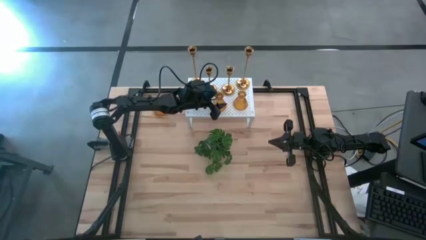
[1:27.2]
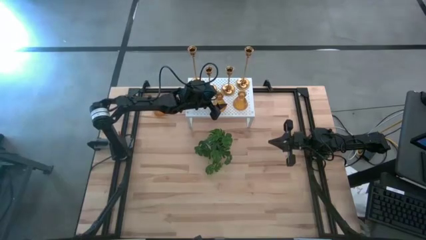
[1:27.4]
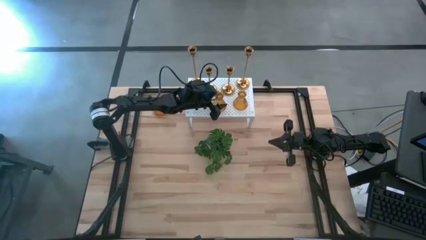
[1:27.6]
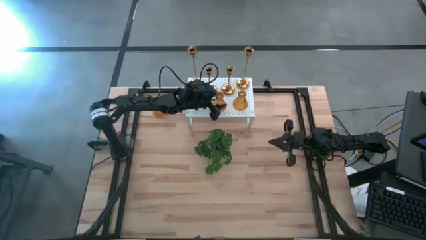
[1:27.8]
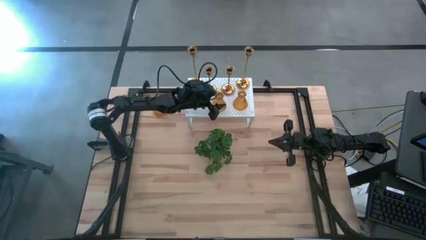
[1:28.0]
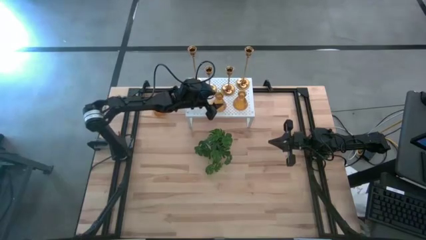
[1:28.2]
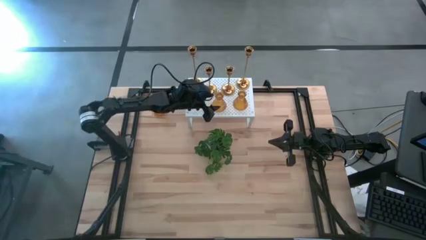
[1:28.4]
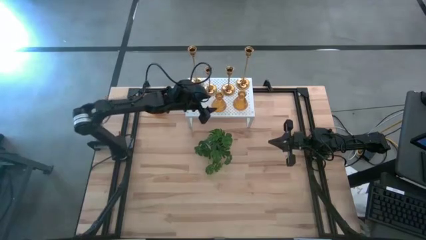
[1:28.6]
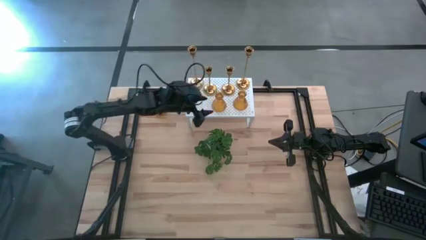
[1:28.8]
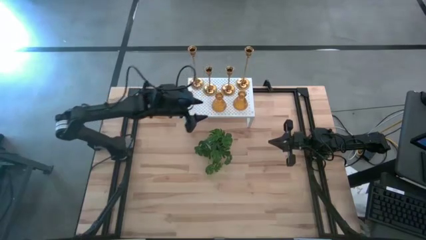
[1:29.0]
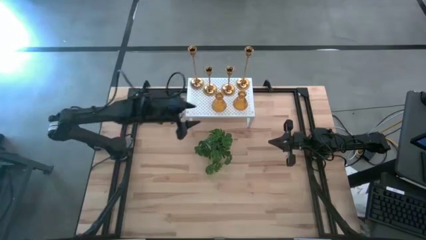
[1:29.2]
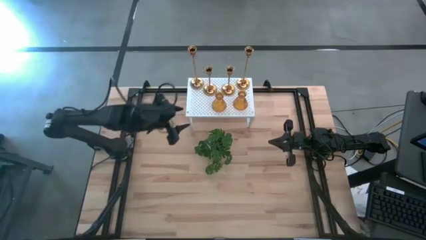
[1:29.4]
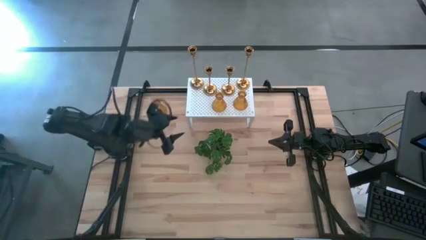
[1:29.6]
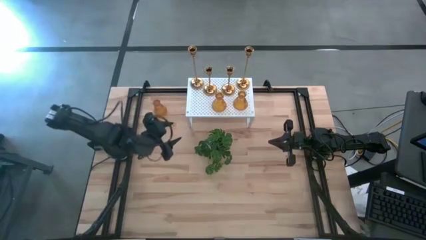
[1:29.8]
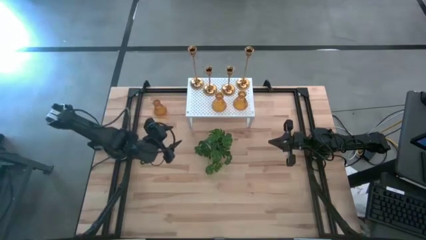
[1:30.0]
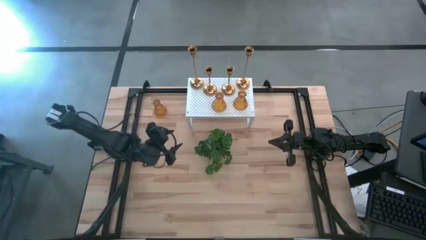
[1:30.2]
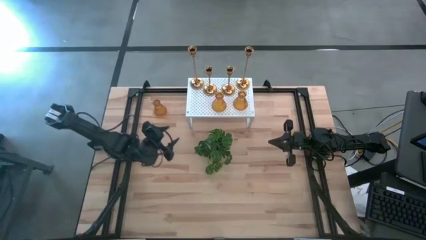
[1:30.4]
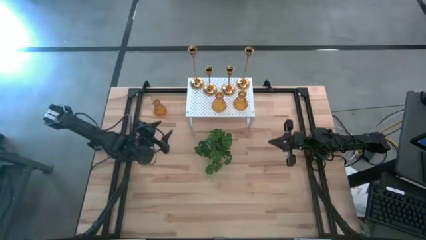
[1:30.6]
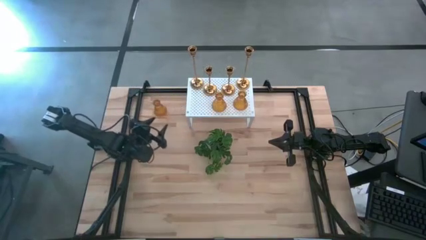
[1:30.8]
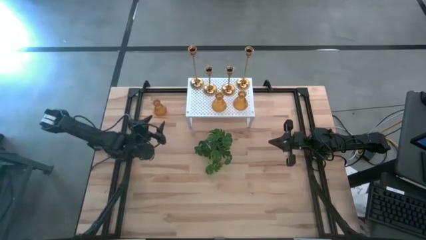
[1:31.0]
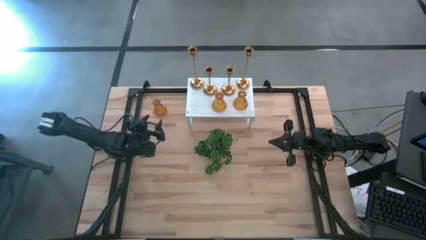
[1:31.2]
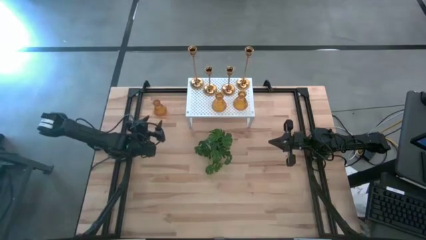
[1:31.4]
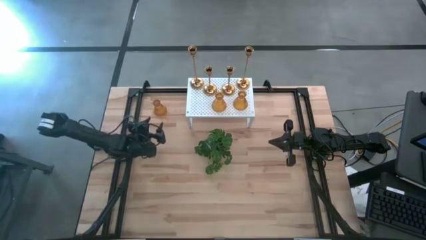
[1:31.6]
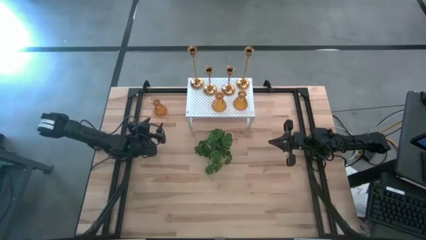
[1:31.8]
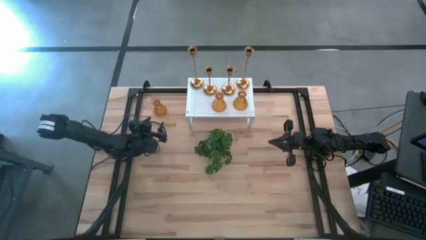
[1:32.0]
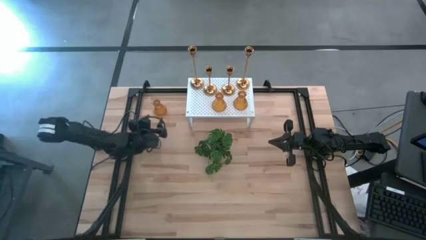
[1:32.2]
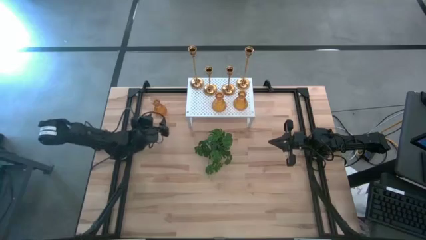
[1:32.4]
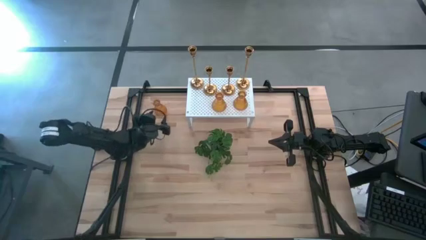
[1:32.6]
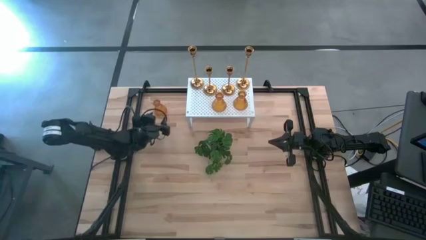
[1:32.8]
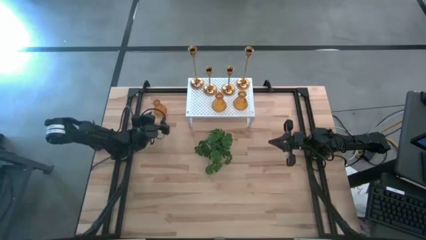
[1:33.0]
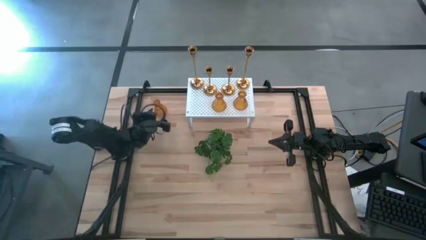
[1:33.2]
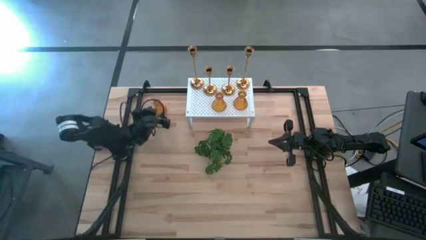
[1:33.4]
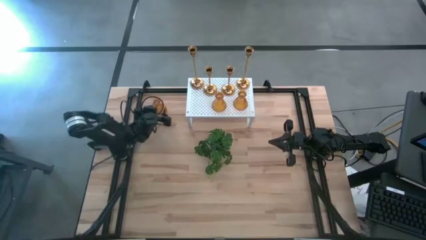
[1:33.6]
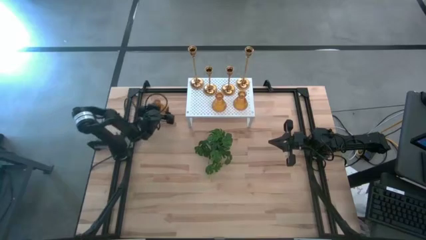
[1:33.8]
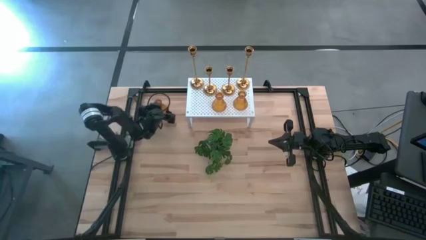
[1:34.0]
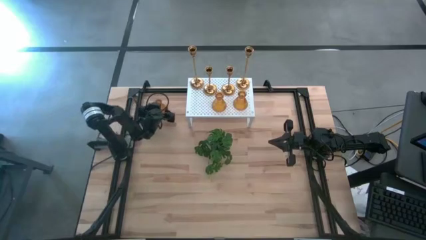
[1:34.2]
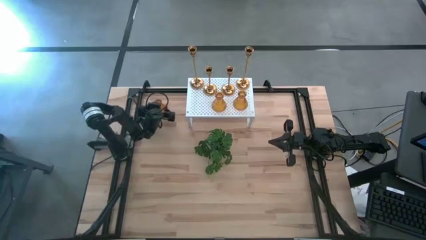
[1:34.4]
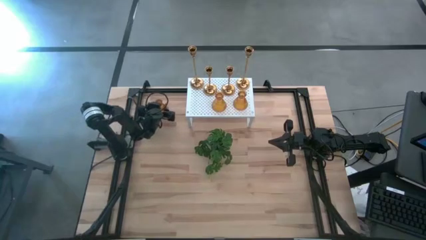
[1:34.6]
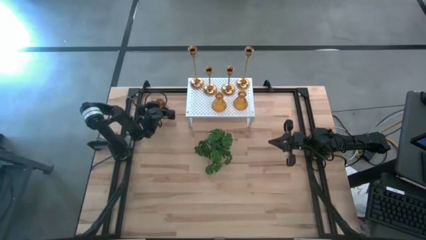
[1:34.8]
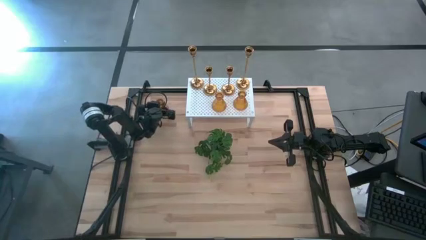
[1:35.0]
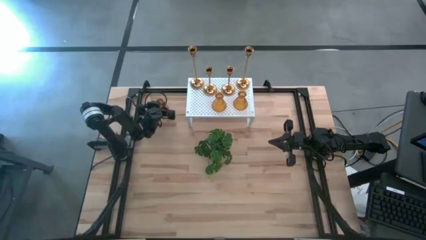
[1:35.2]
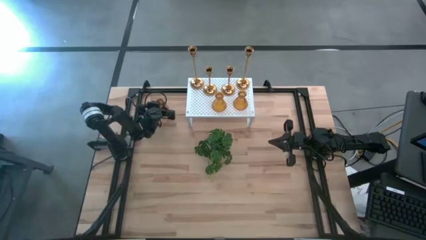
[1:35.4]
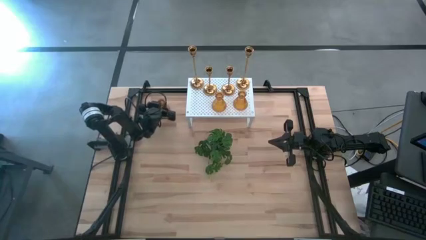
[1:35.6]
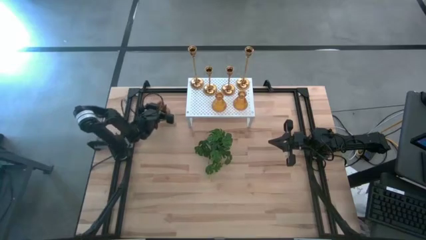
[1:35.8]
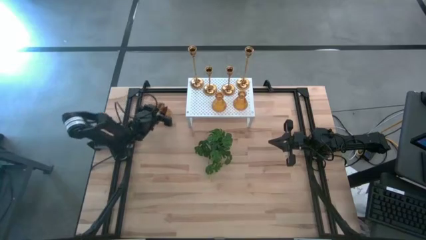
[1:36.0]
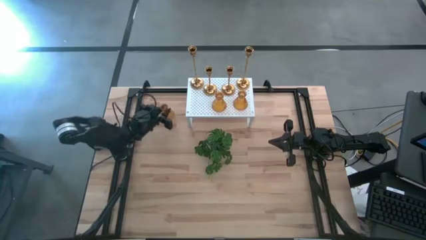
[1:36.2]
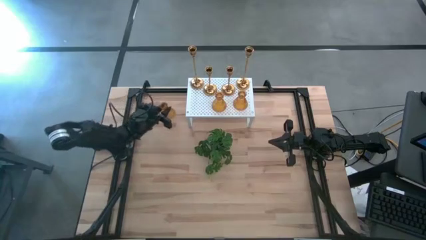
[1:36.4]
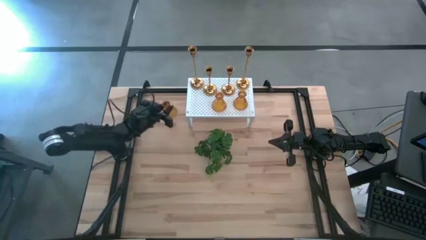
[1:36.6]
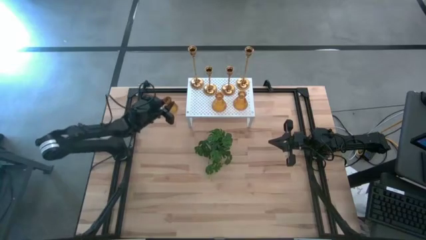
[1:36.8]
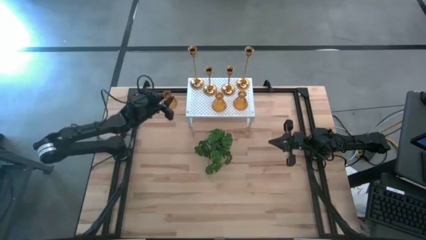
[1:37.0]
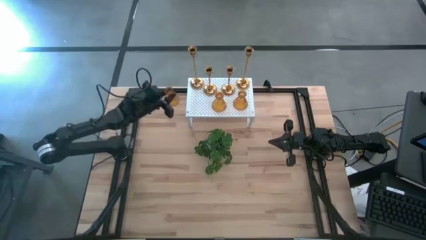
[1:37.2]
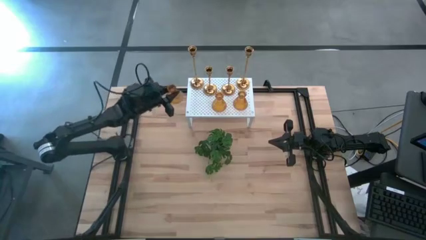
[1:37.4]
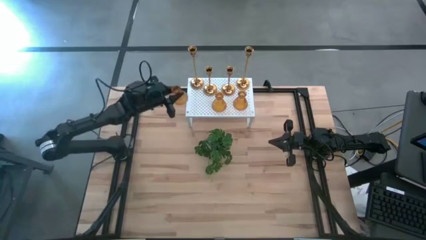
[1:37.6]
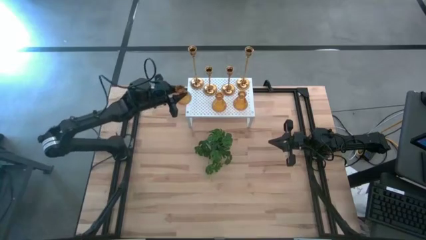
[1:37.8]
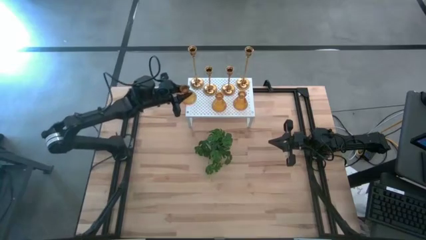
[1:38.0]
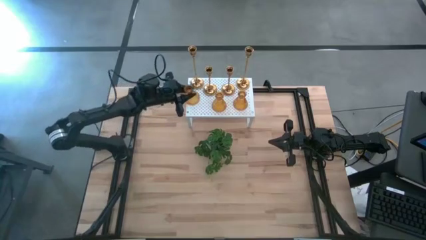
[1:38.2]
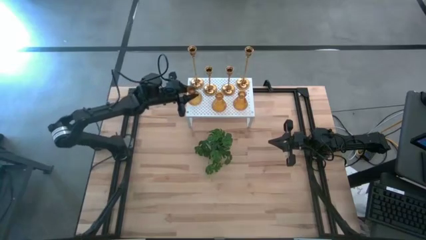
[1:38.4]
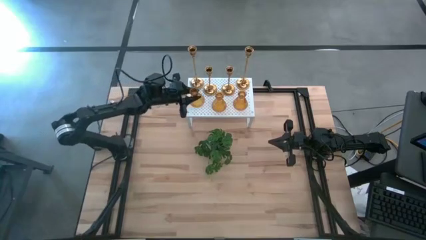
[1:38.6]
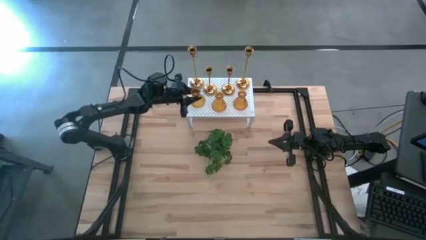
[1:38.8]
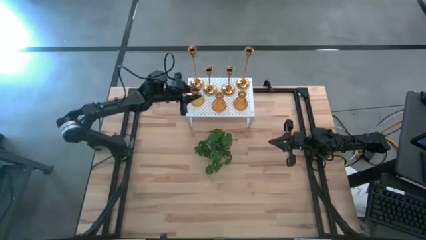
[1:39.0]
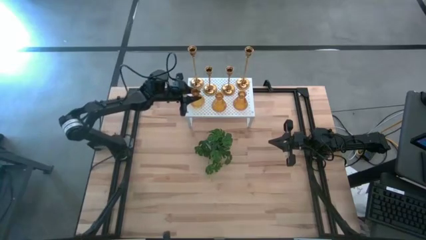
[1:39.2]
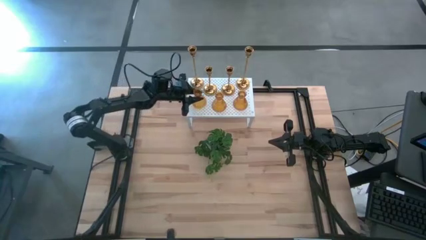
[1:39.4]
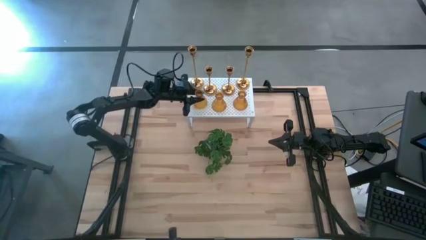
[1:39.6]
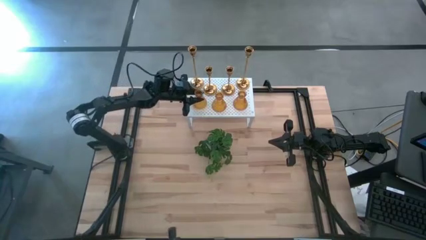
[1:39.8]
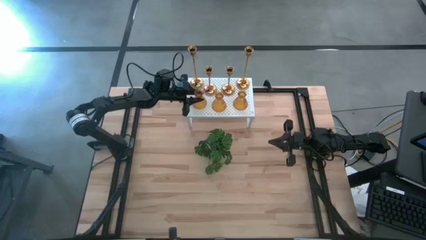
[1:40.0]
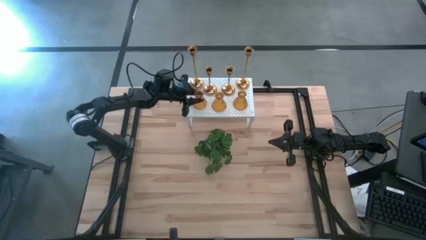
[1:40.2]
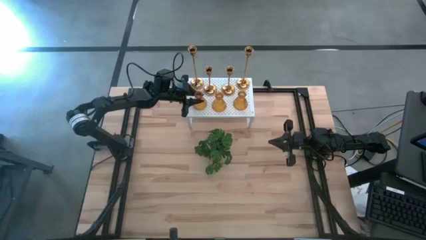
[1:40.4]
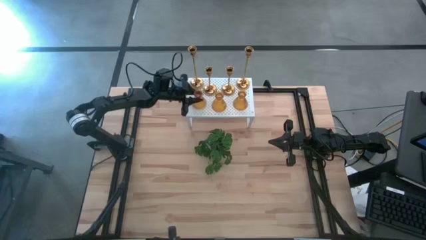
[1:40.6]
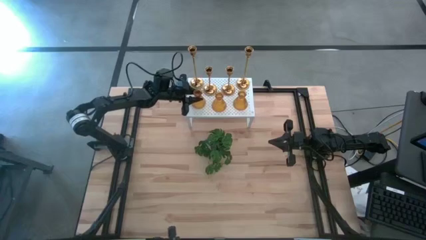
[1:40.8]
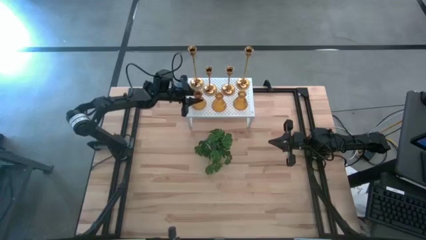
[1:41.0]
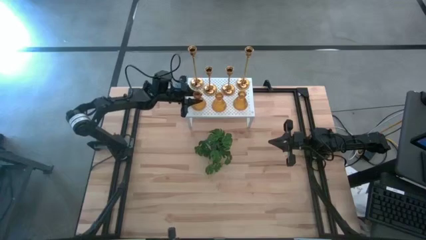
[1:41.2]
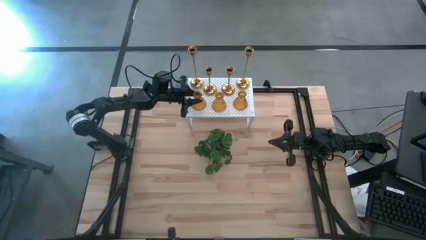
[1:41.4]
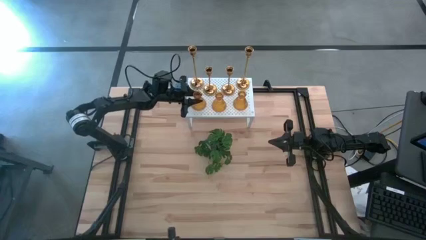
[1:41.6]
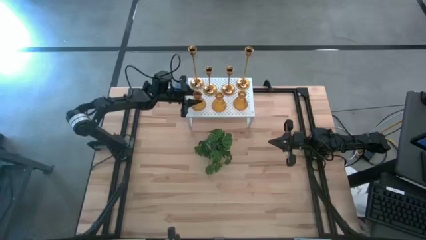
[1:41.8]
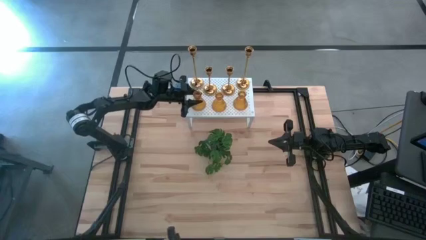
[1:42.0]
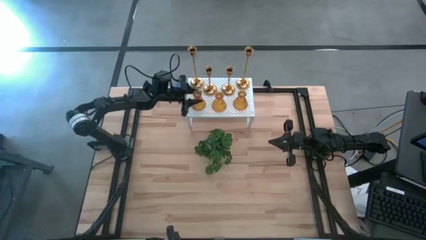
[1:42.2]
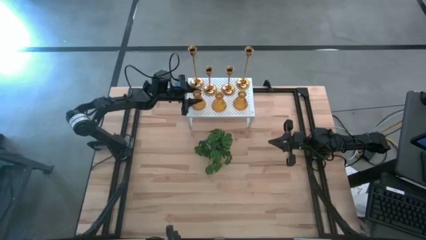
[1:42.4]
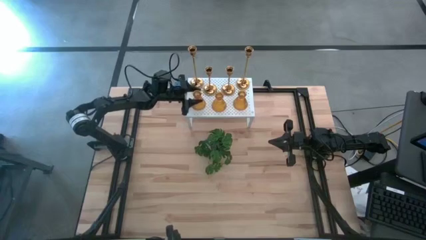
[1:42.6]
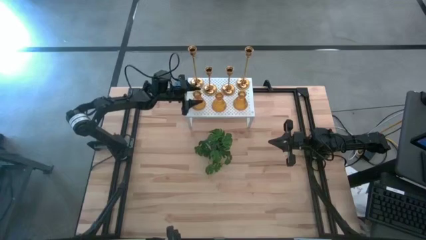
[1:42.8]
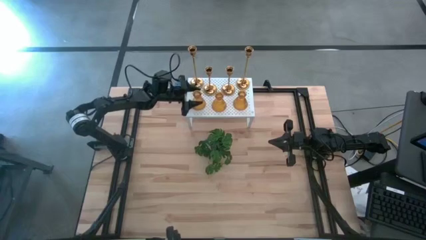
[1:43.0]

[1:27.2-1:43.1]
Task: Pick & Place candle stick holders
Align the yellow glass candle holder with the other yellow glass candle holder on the shelf
